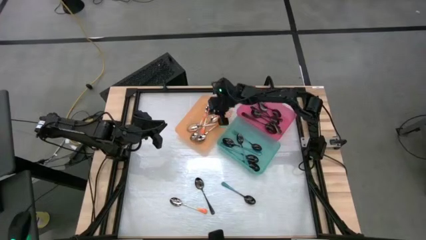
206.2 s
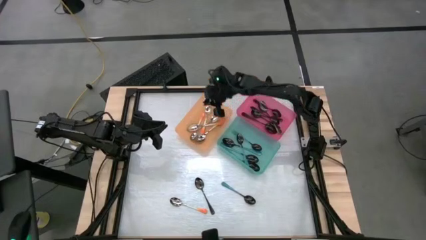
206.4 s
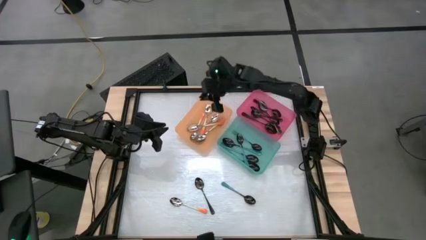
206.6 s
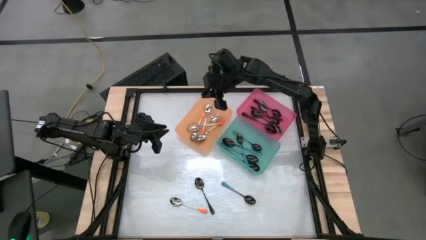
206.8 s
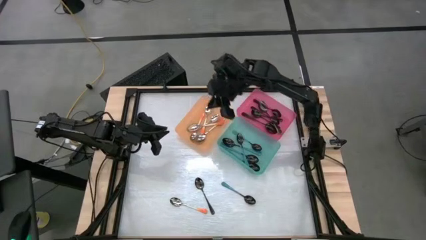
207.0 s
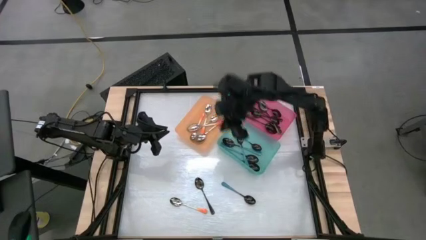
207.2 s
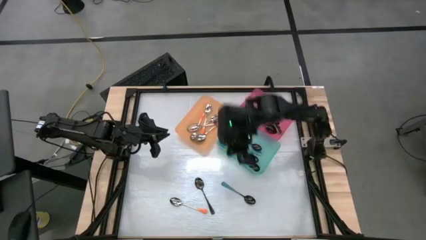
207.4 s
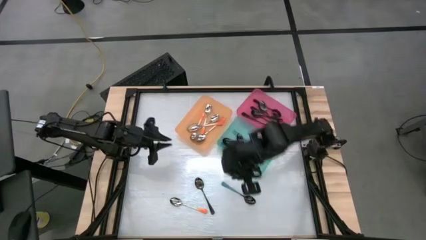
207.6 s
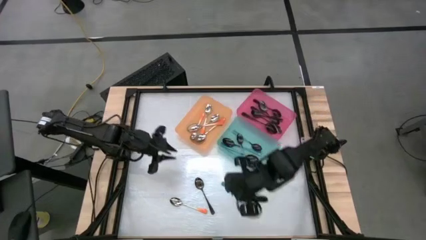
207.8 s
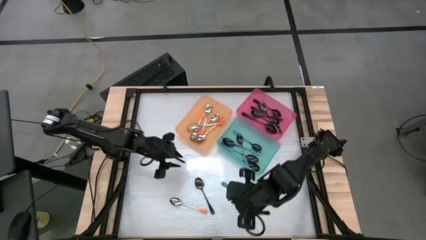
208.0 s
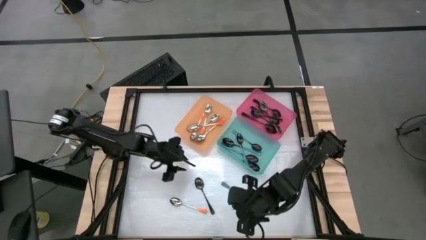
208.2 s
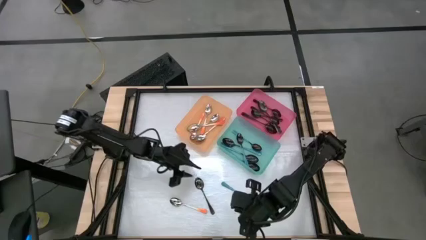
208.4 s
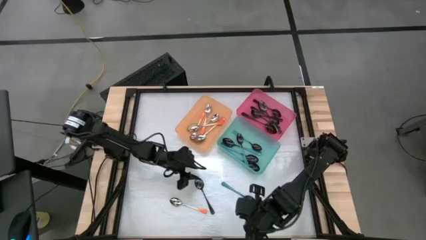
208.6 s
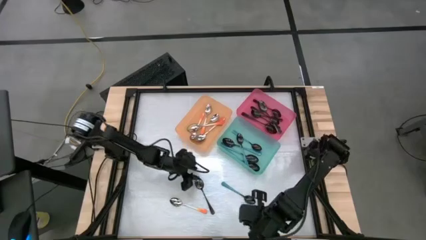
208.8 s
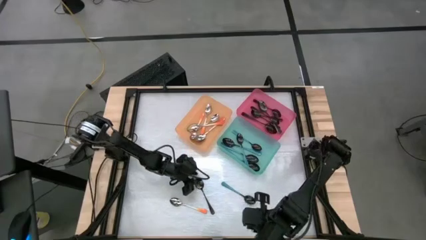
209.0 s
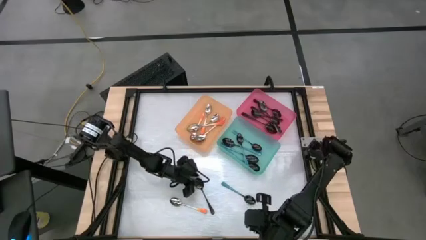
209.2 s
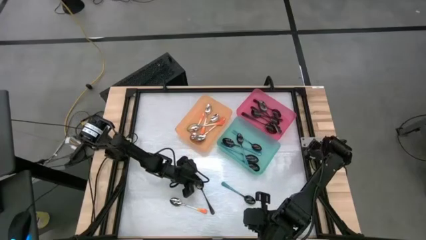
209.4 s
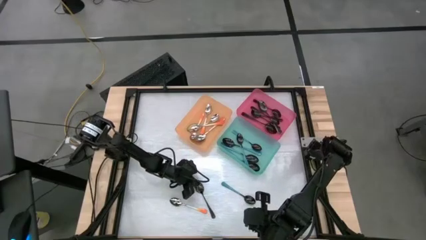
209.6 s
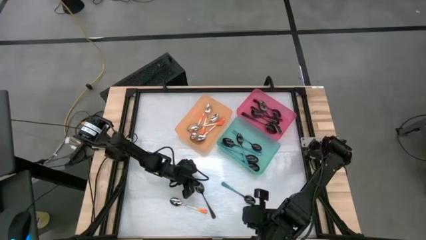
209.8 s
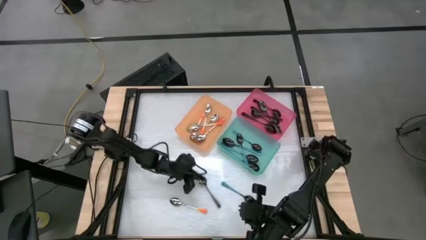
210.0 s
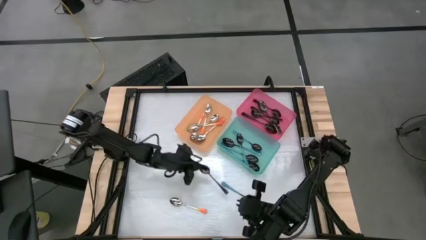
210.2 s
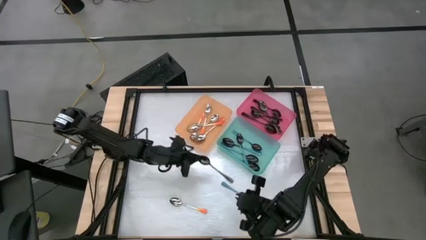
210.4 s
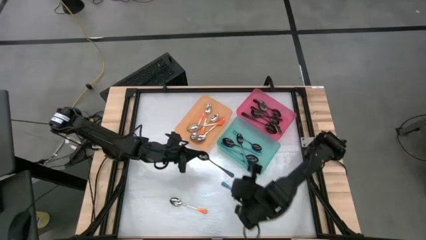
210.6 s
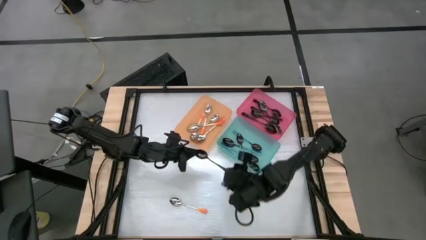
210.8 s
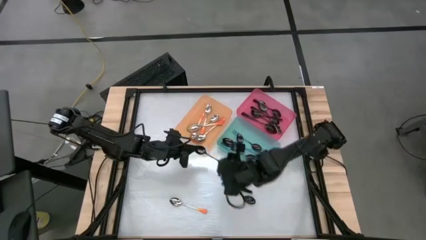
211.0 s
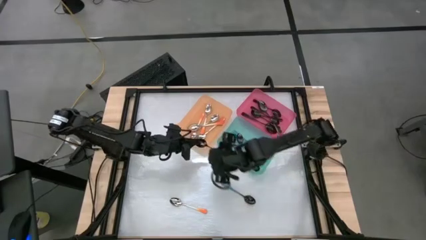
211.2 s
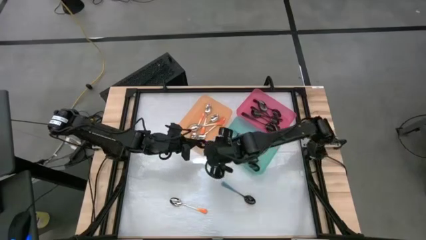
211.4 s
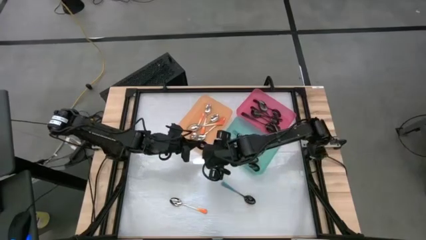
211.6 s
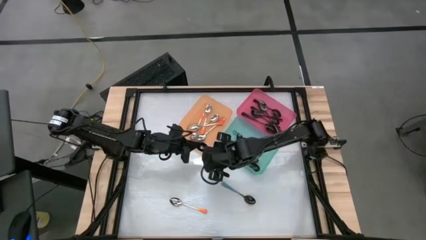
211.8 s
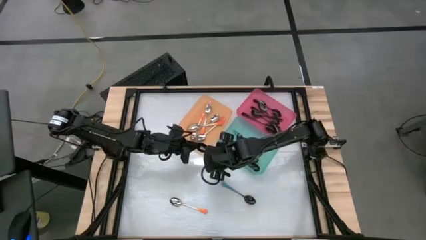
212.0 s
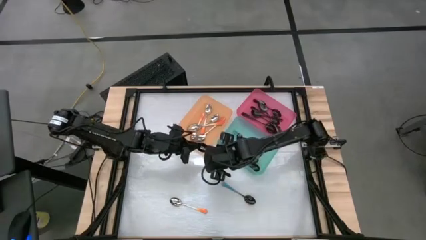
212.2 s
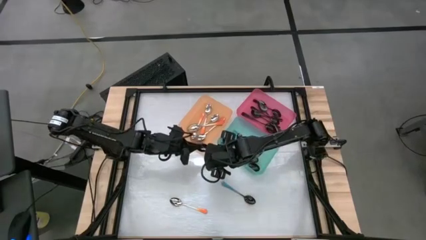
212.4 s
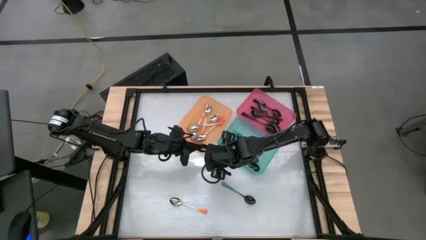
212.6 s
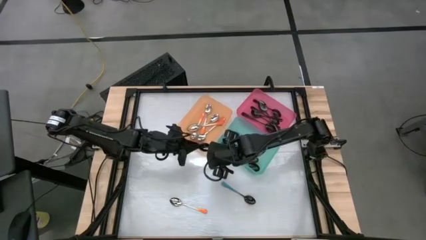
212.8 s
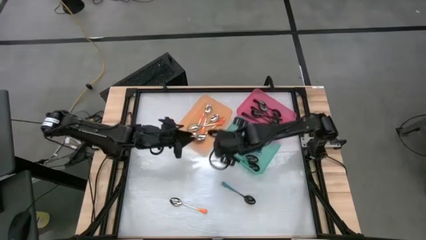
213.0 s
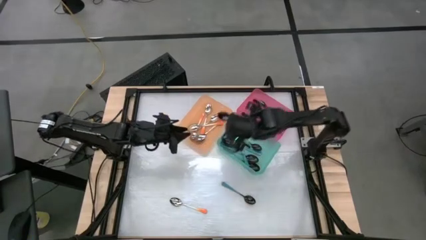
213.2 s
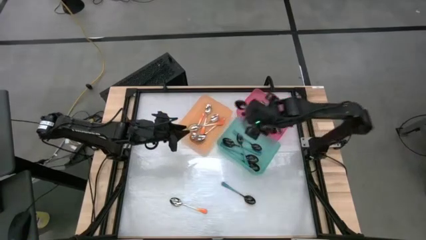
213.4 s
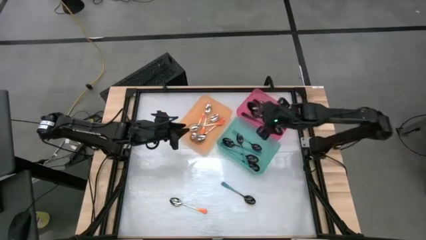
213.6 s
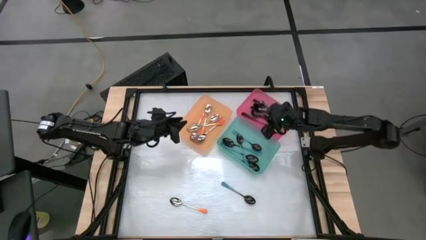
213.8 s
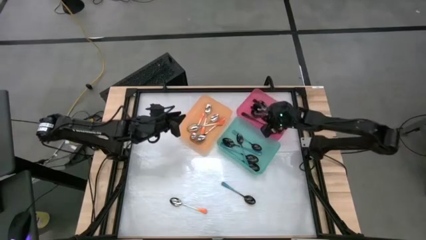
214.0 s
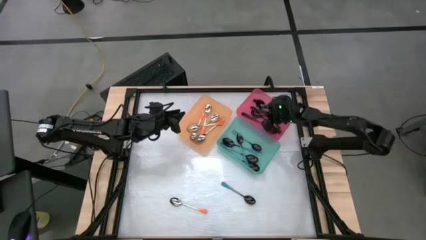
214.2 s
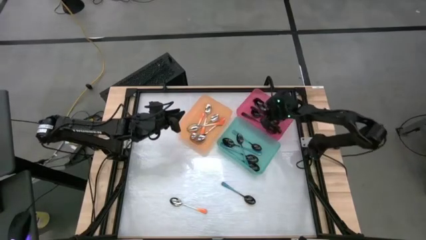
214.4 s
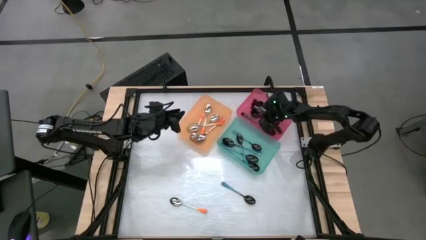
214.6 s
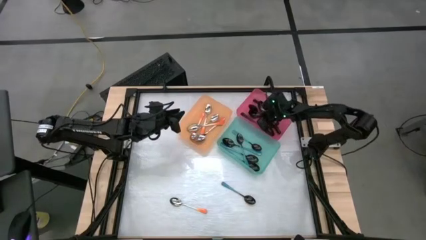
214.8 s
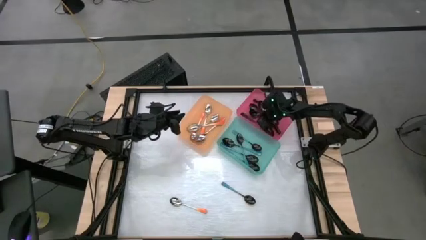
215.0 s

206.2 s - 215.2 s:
Task: Sort silverware by color (type)
Put the black spoon into the pink bin

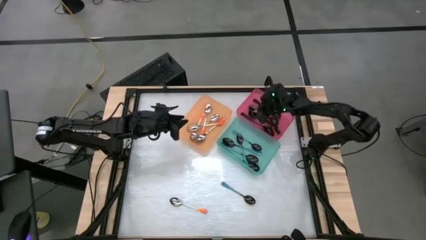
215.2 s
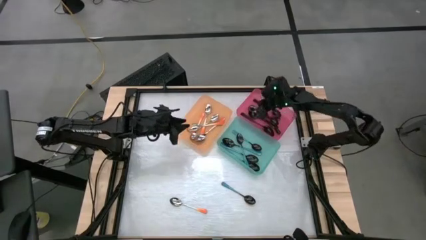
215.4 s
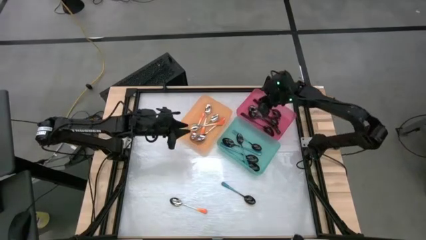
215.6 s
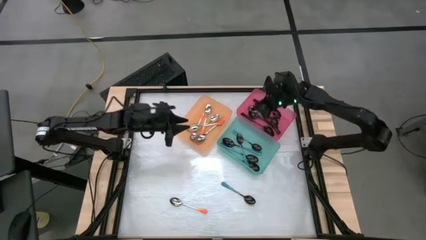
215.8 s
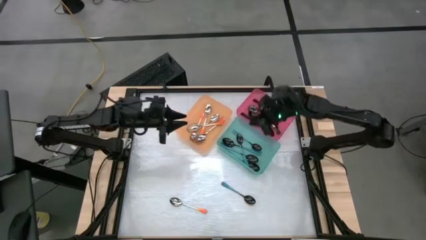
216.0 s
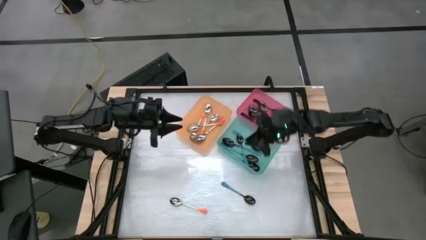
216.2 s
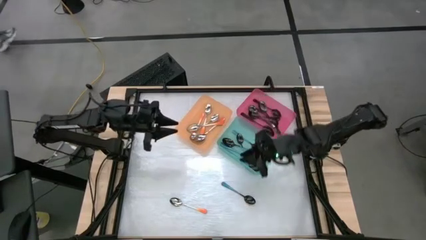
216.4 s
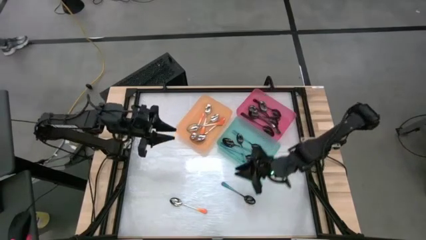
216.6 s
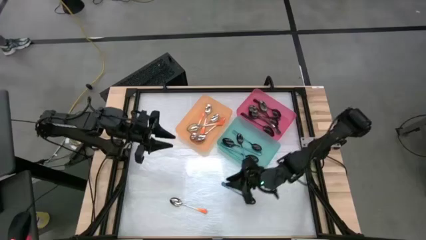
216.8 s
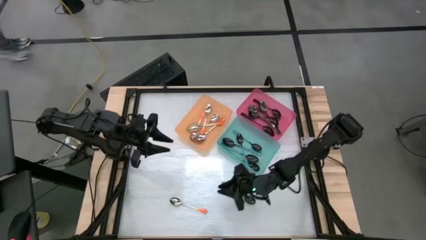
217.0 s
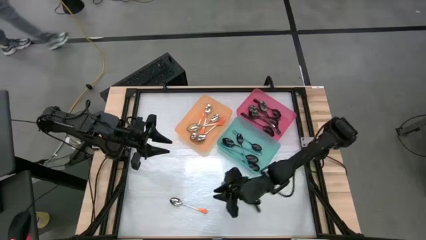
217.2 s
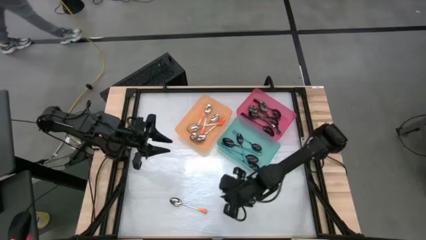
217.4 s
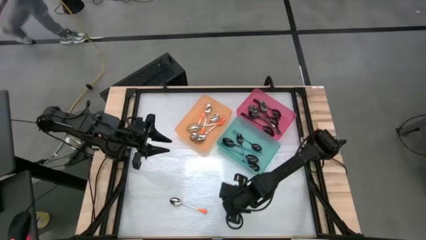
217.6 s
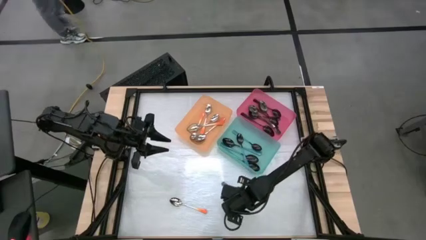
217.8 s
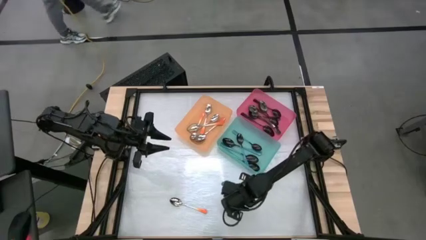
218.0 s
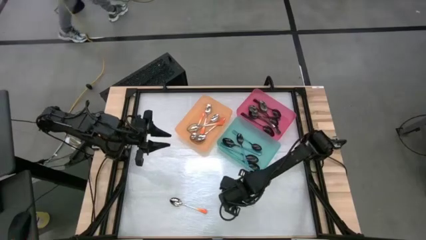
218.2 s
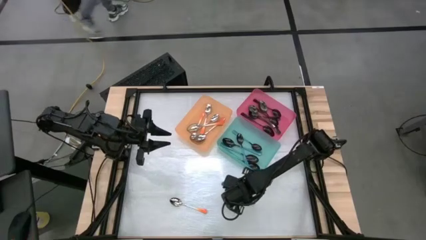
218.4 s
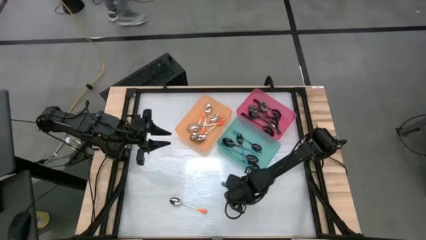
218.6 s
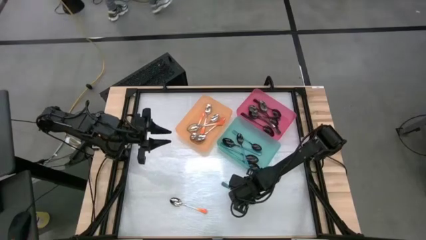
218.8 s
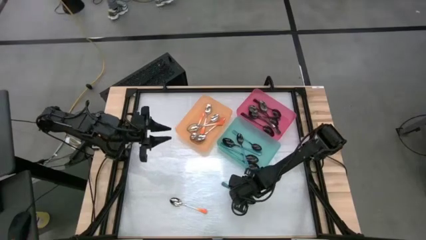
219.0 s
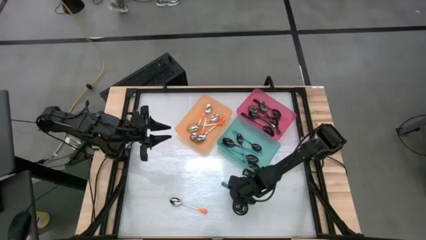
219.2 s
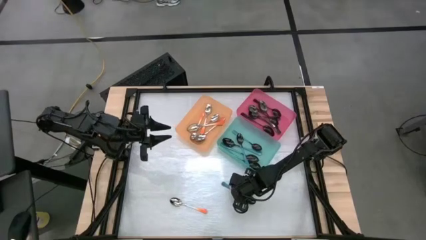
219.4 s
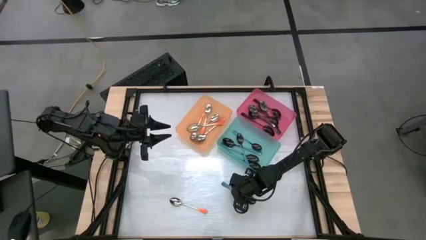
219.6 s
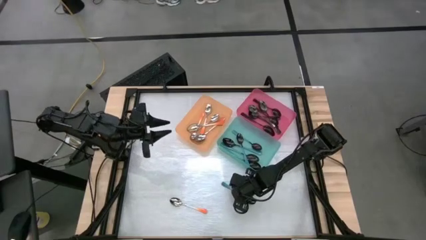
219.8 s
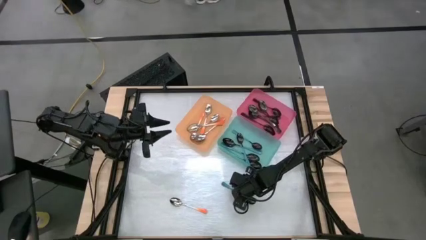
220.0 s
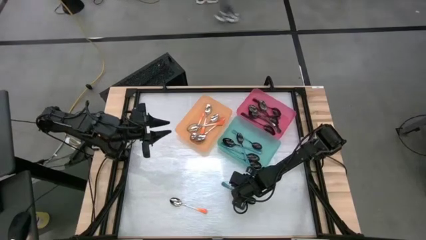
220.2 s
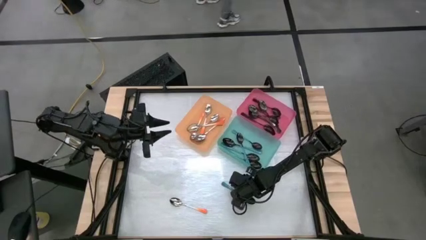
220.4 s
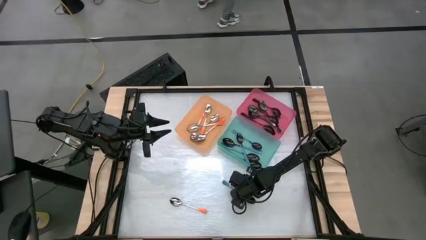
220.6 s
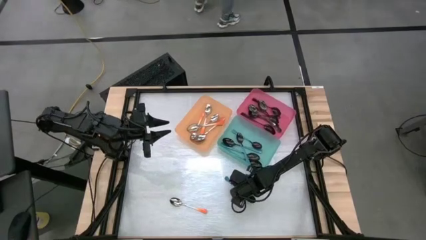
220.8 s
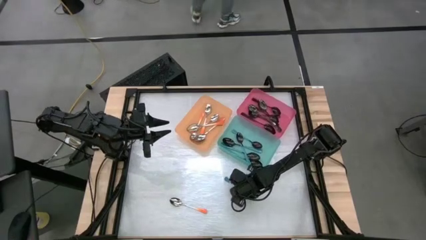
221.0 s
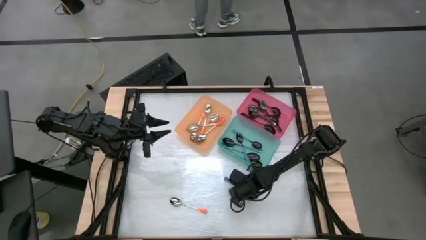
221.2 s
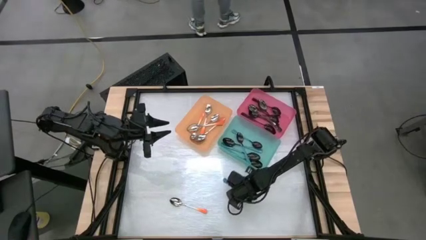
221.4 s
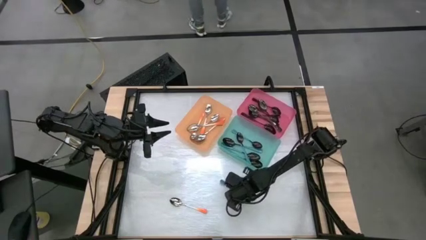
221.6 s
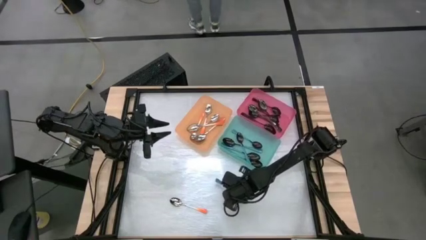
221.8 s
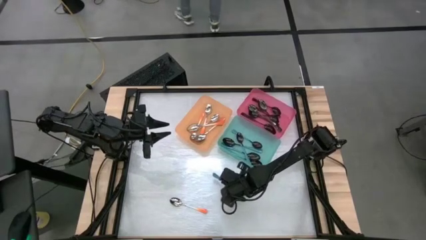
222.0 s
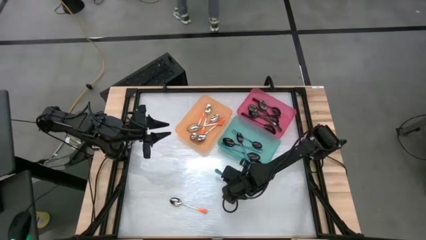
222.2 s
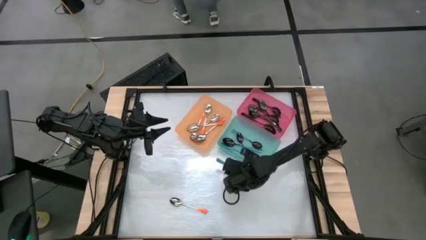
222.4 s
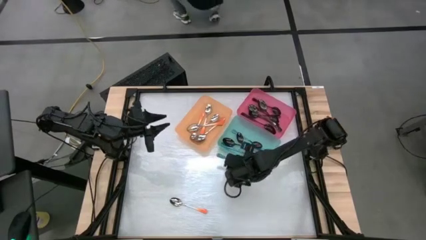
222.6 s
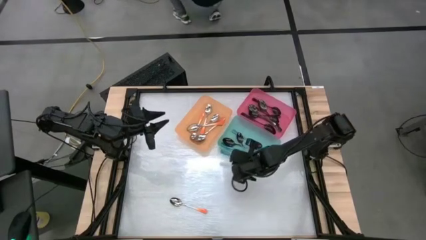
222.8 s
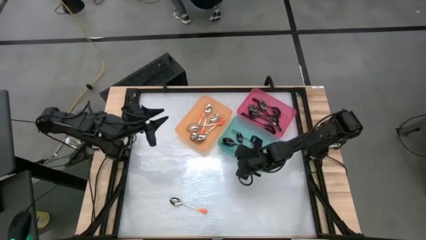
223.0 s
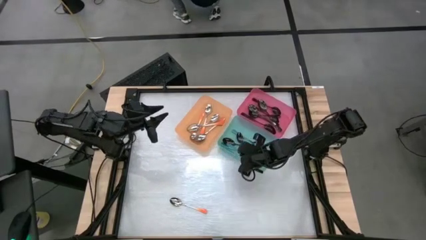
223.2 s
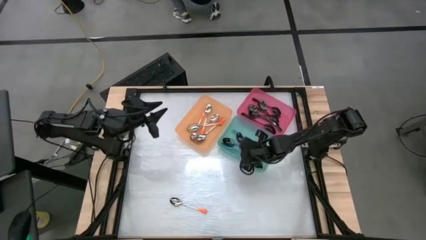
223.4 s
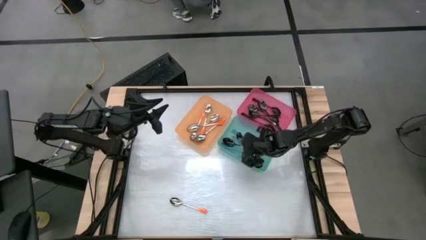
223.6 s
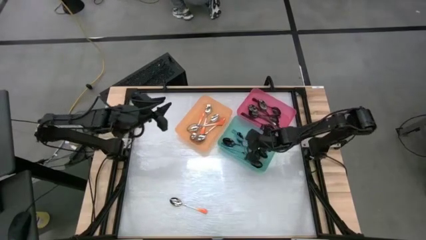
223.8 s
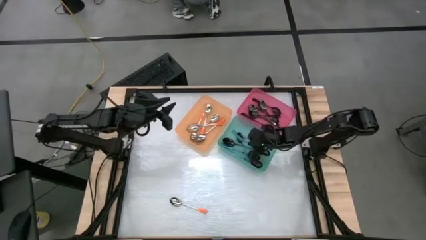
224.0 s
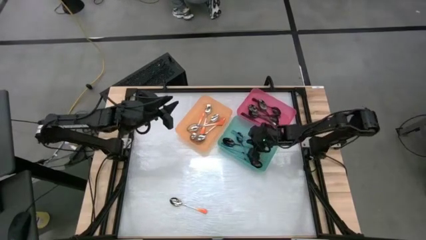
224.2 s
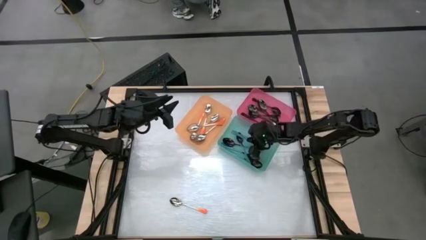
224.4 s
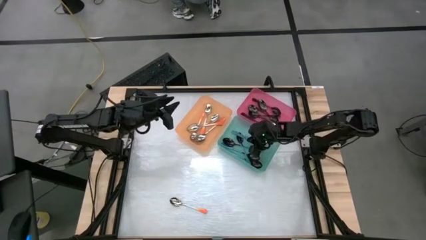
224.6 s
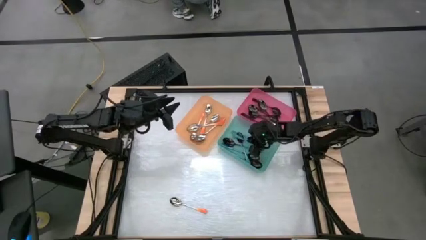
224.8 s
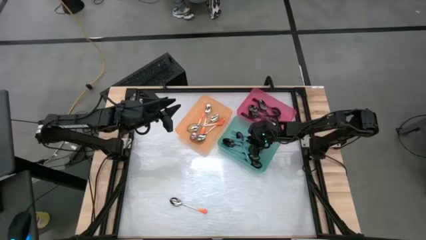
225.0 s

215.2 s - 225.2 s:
Put the blue spoon into the blue bin
